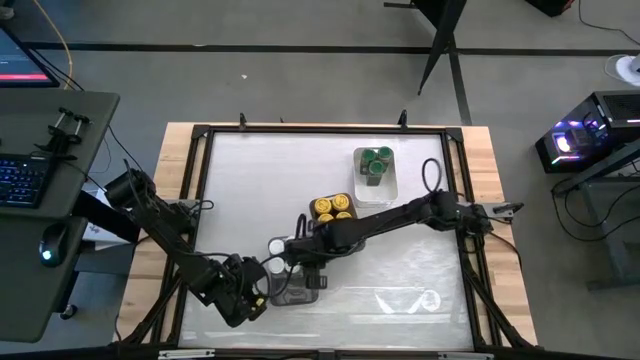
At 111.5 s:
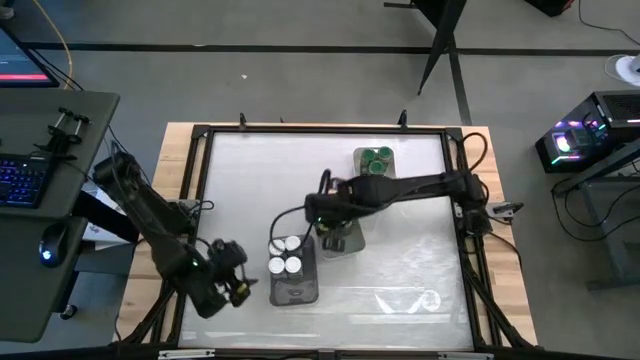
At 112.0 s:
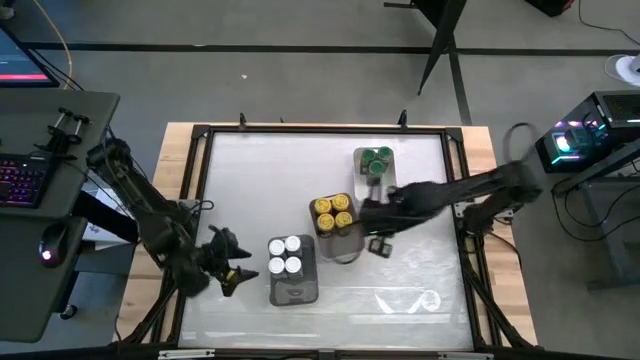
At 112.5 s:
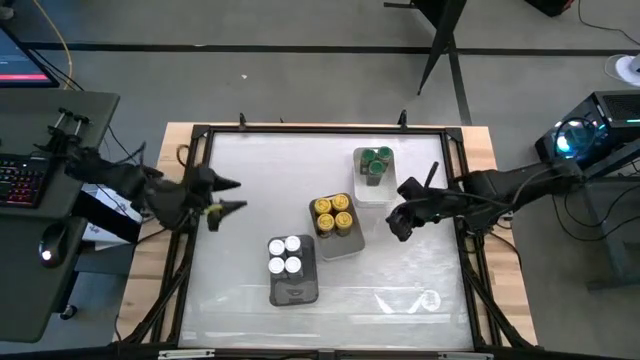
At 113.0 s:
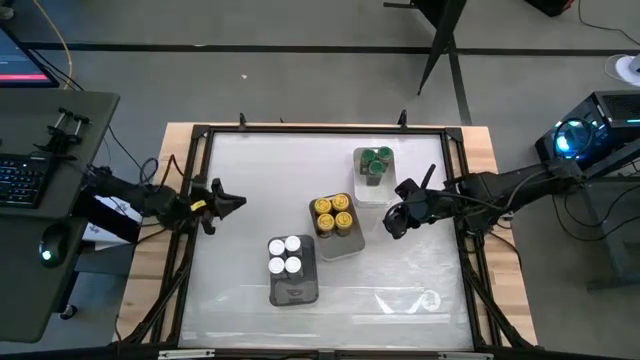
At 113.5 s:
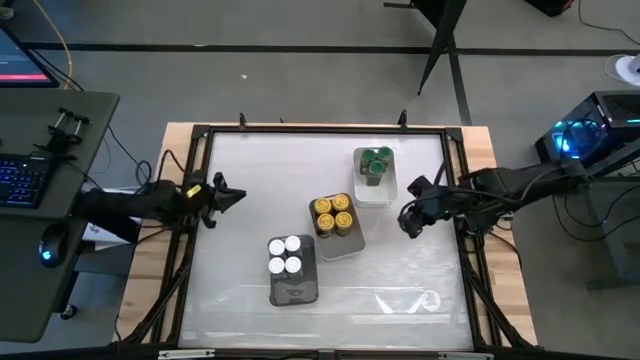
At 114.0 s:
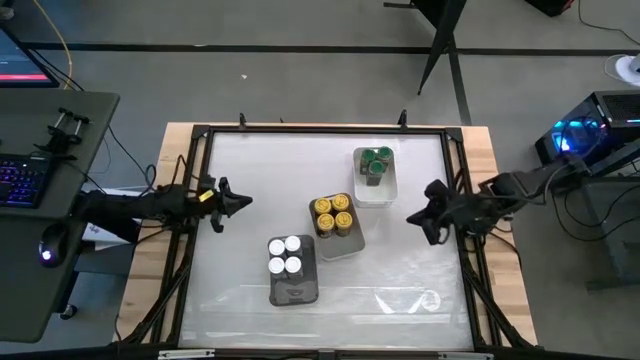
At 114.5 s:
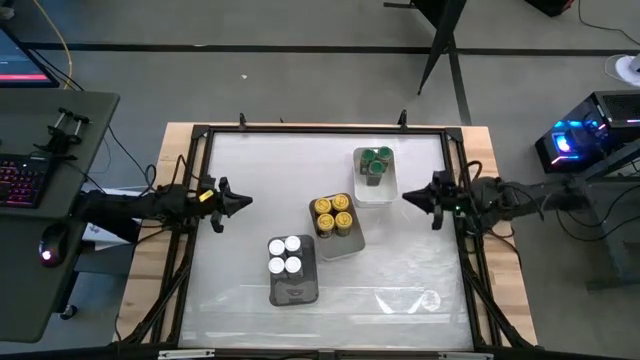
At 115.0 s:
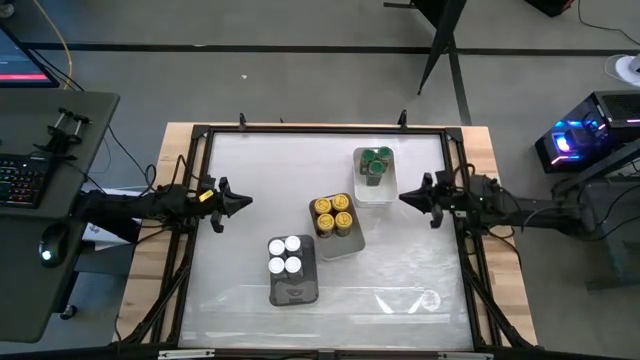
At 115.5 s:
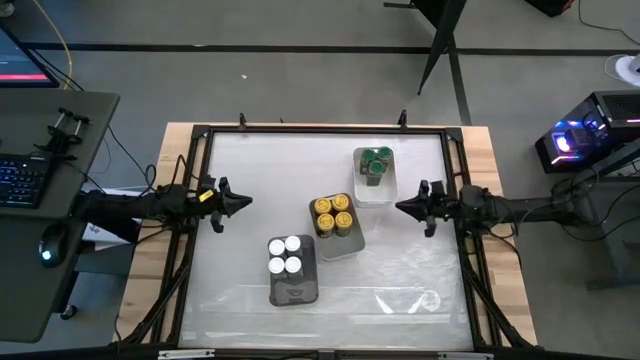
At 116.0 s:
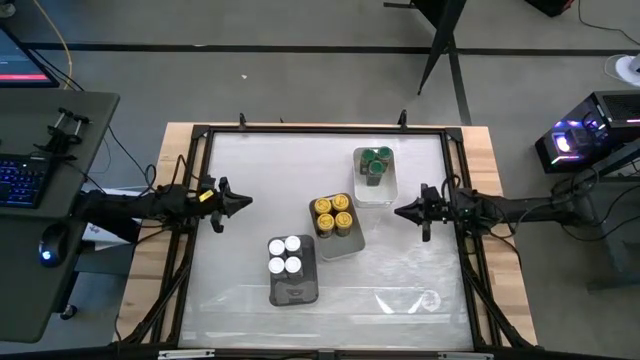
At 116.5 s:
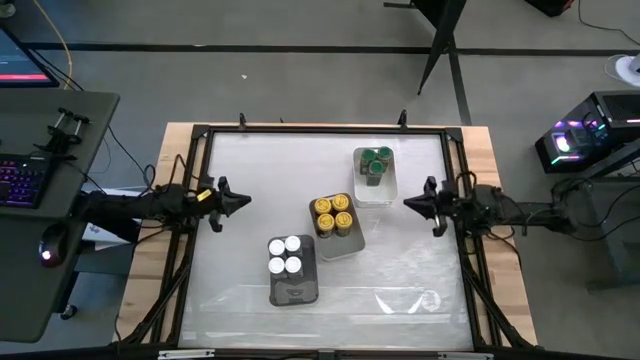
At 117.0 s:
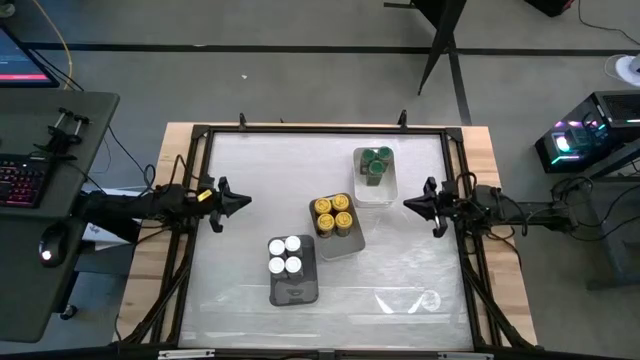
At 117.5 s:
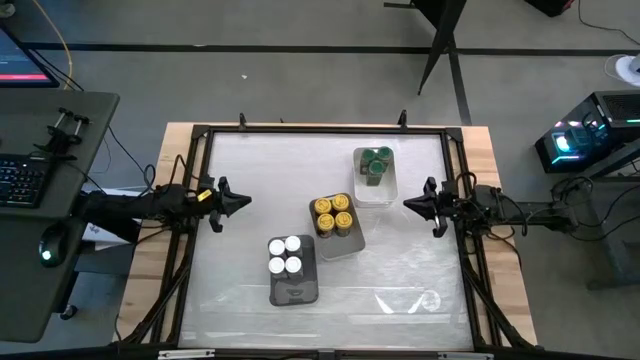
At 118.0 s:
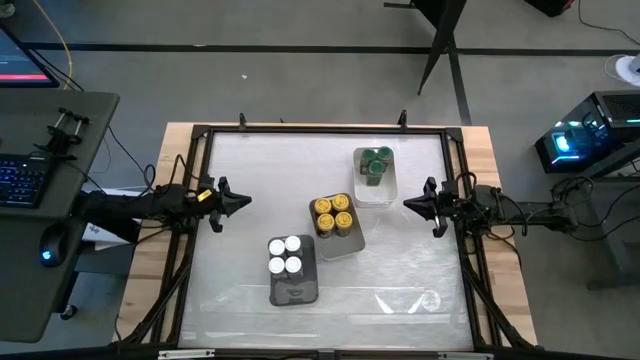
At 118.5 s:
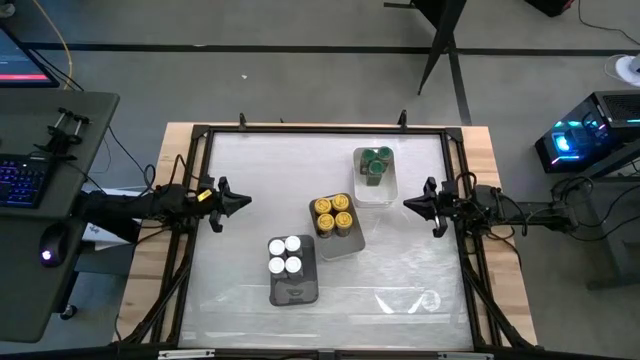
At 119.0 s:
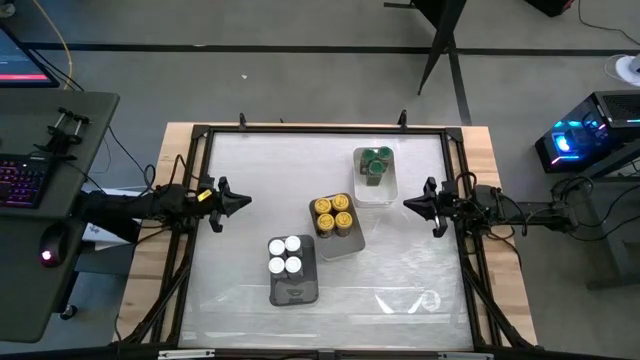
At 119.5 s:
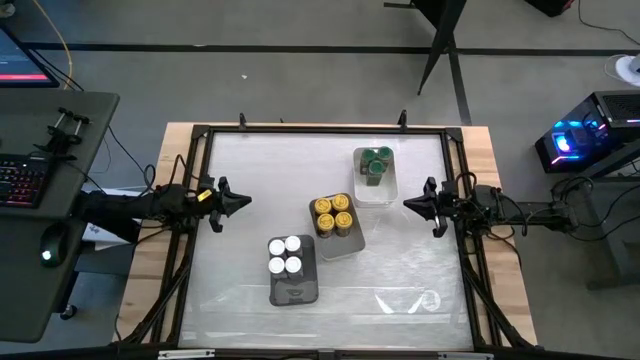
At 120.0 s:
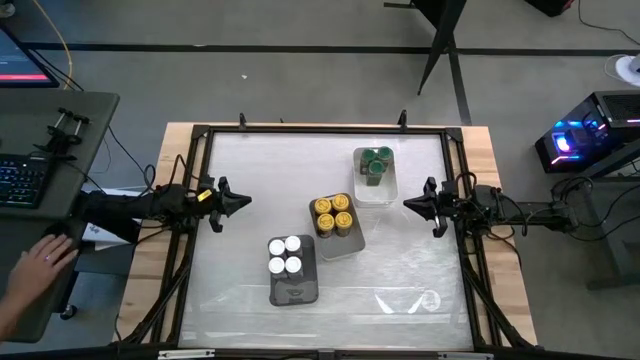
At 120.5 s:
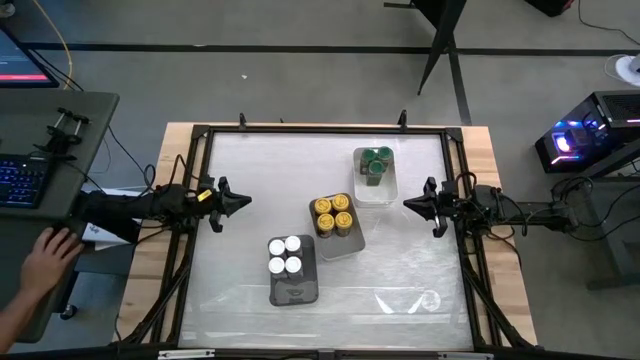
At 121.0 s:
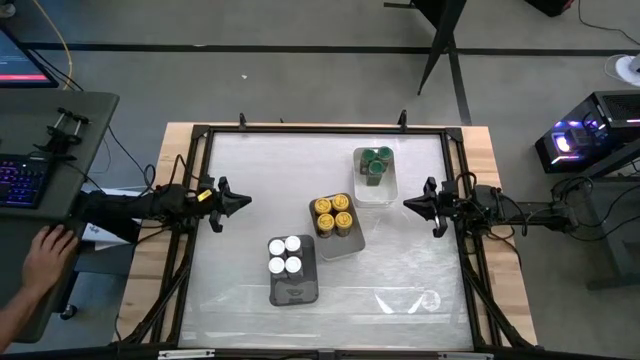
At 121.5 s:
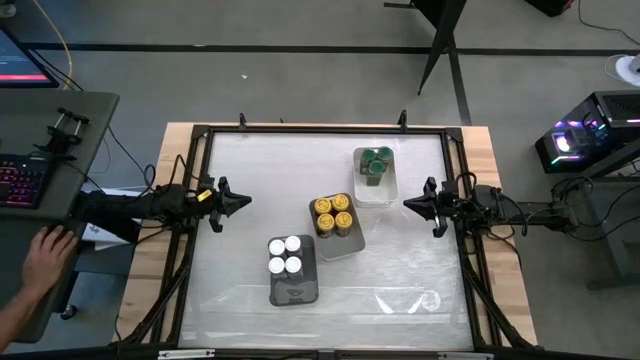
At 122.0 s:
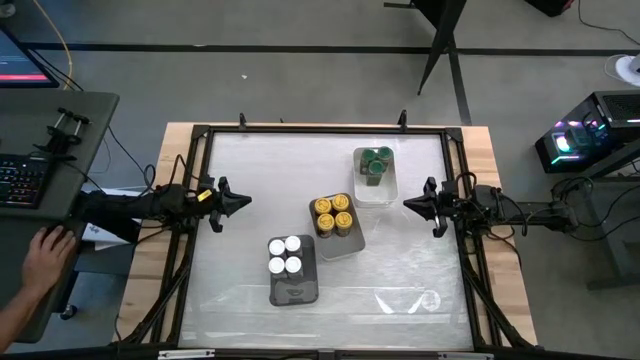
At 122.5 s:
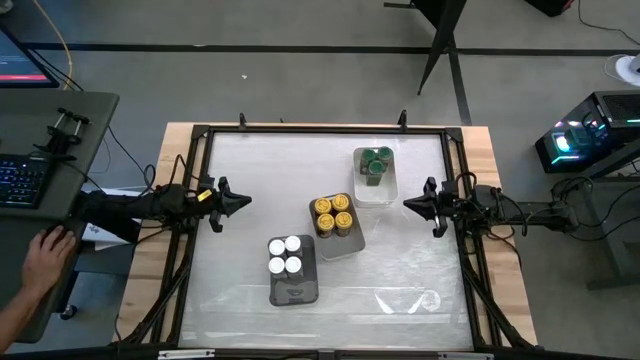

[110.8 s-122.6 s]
Task: Sort spices by type
Return to Home Position

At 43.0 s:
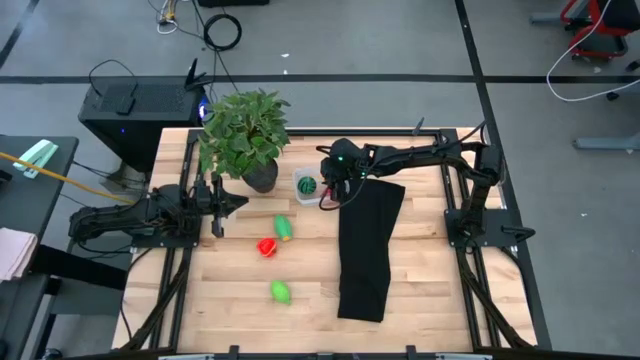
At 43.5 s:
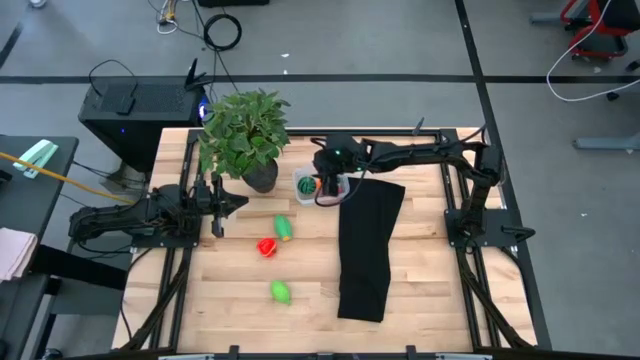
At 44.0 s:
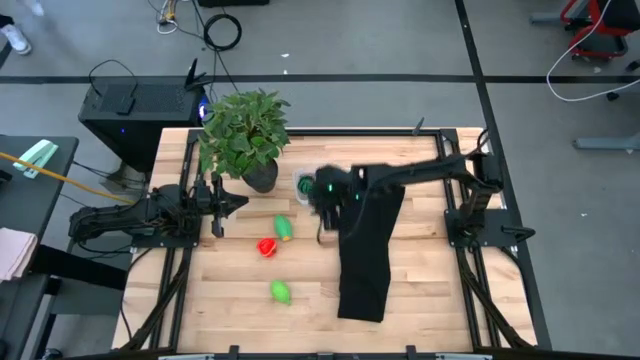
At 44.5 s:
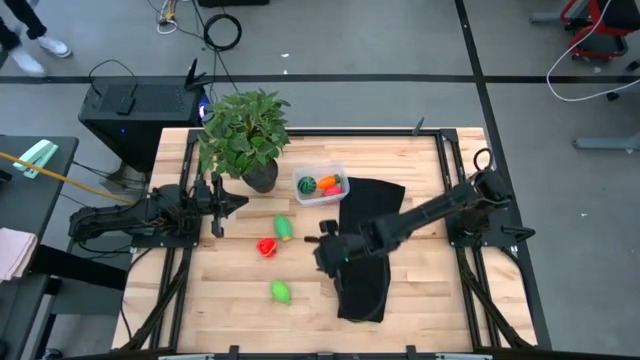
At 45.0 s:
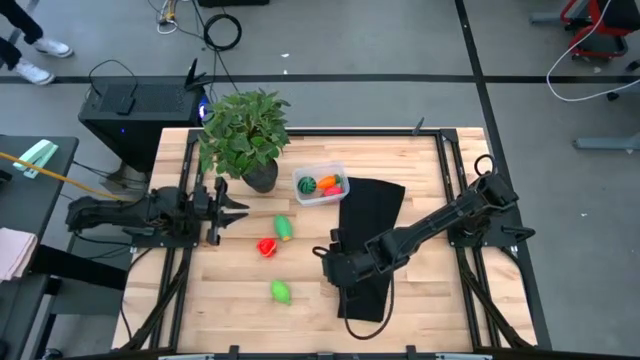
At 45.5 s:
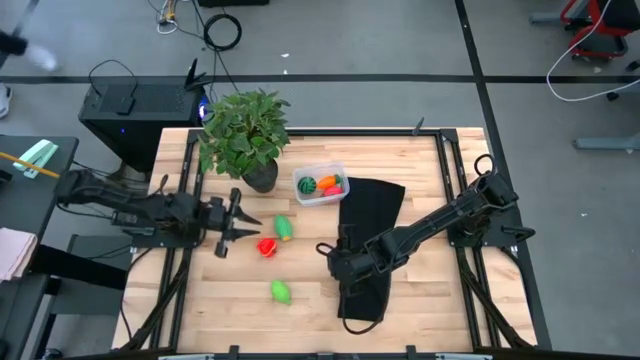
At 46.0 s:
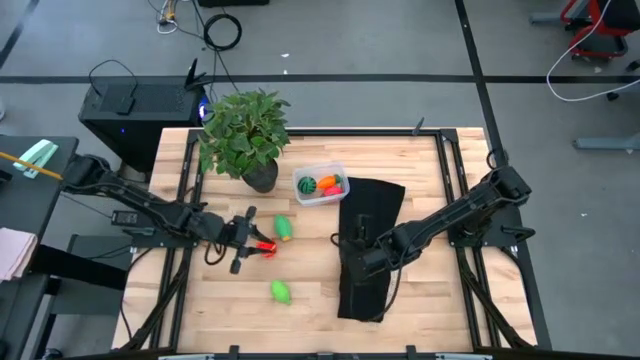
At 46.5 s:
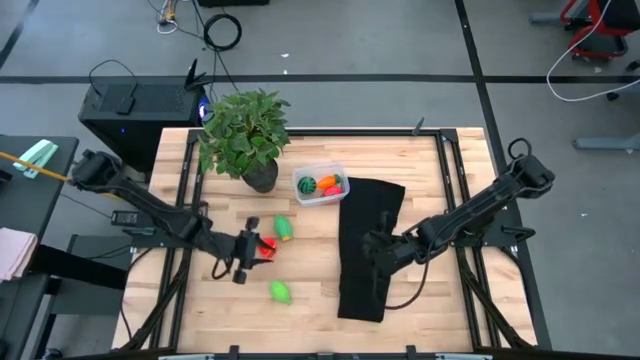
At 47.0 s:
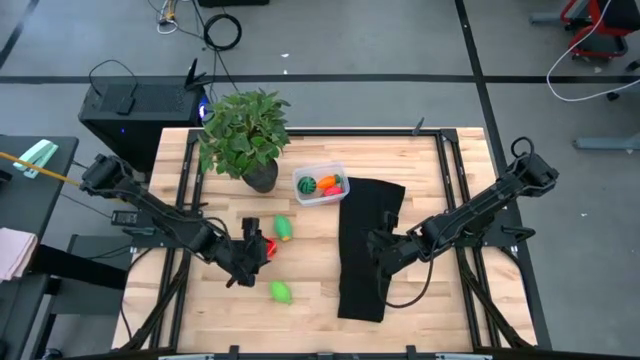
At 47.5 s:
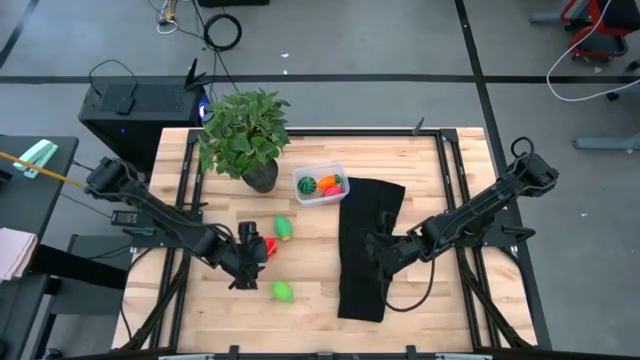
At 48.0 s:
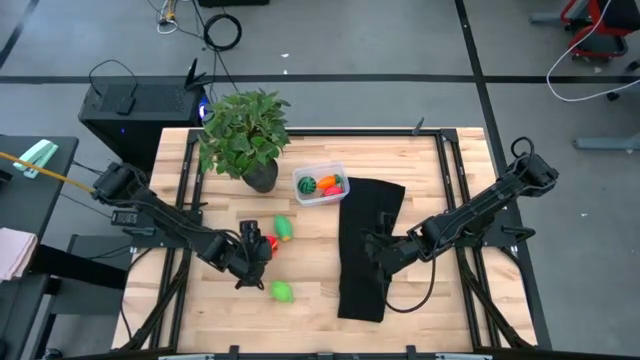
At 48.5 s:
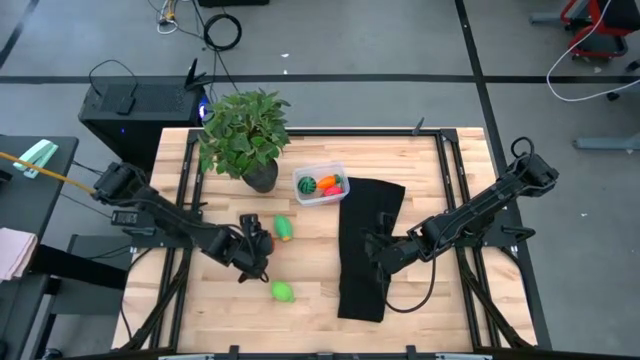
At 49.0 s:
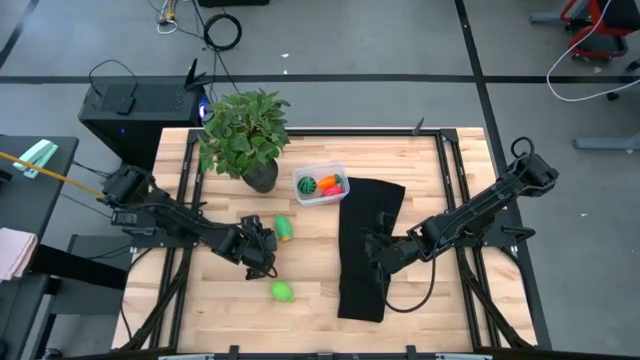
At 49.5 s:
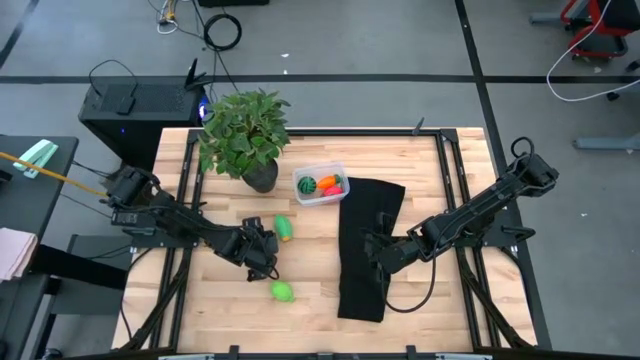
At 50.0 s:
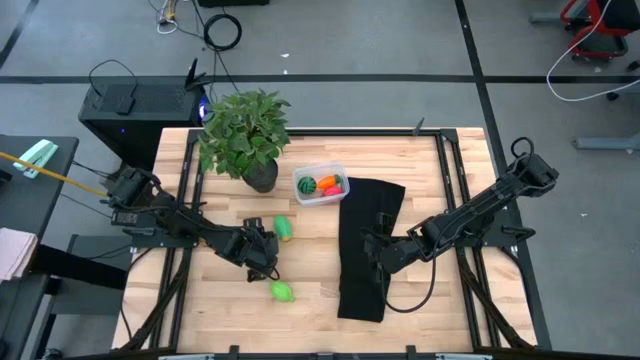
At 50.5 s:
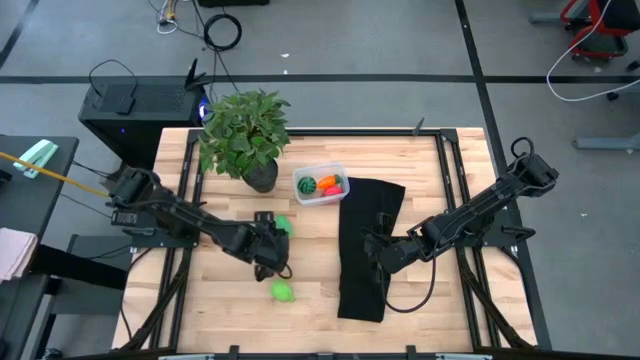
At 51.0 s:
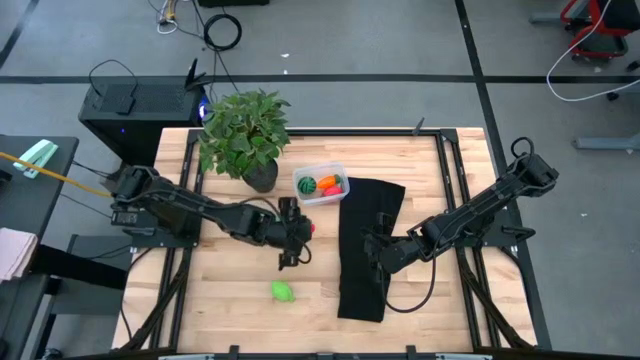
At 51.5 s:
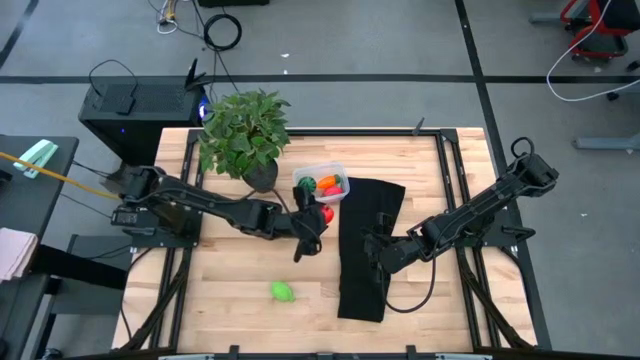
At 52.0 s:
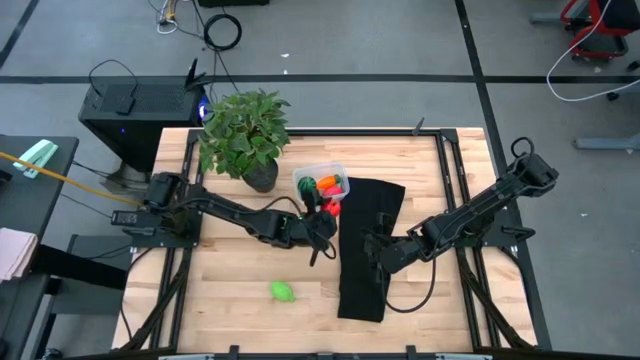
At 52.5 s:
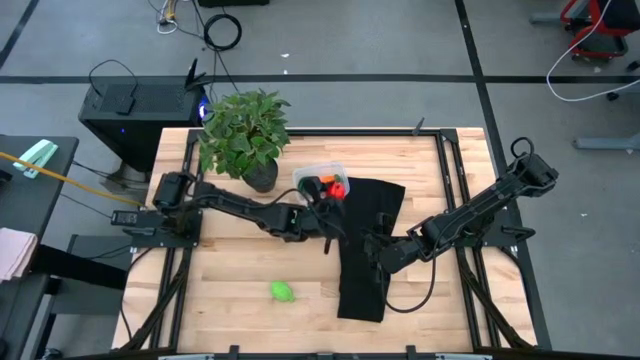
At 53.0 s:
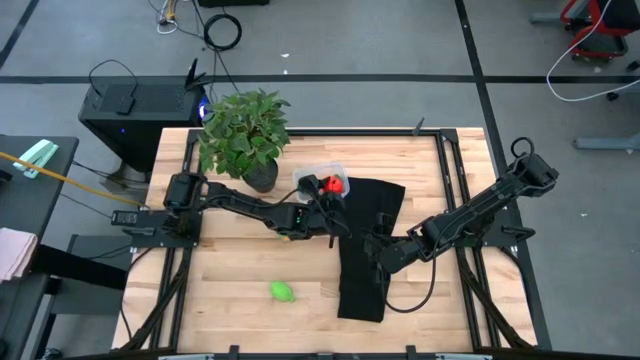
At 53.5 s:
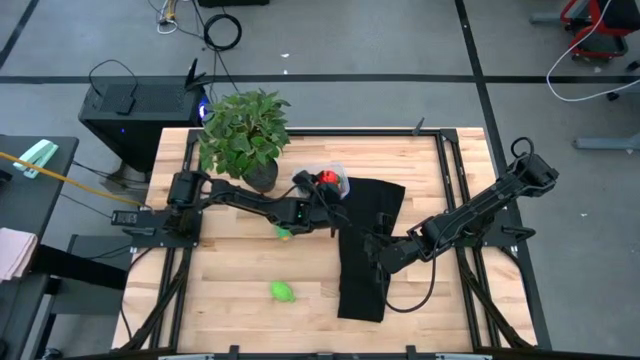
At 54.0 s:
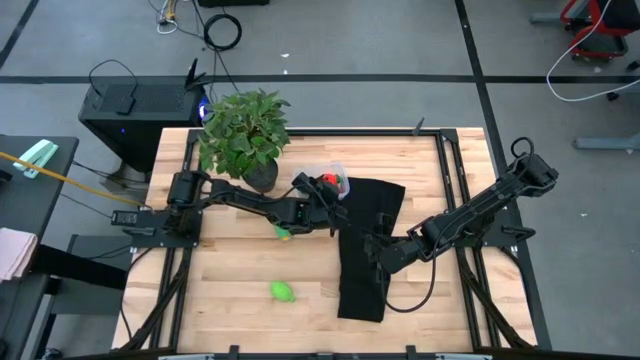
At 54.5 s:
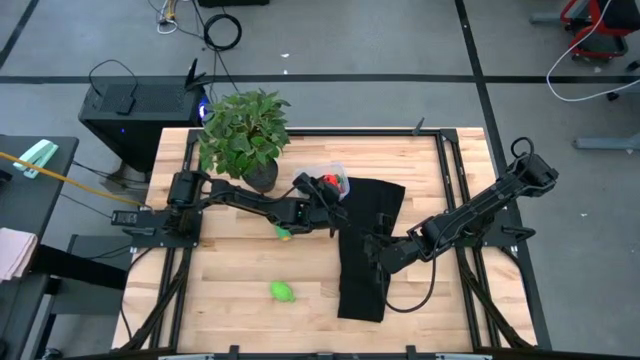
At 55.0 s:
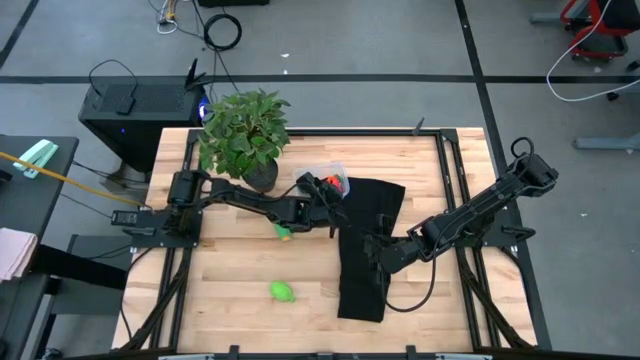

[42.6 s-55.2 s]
Task: Pick and placing Produce into tupperware
Put the red apple into the transparent bin
